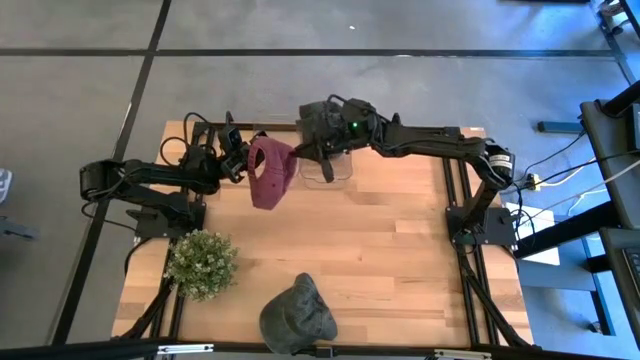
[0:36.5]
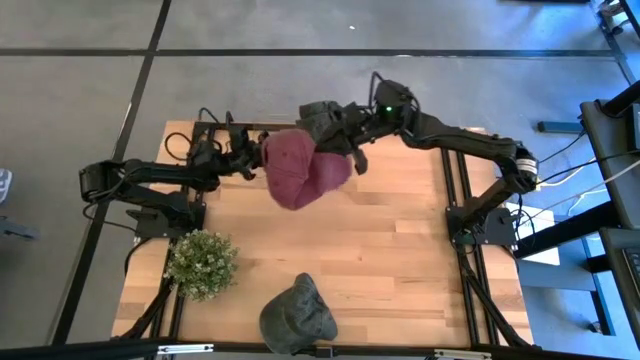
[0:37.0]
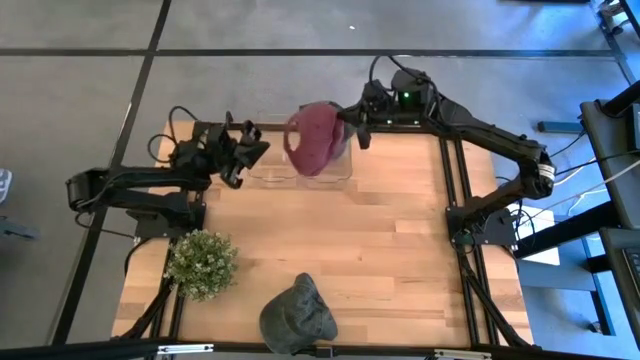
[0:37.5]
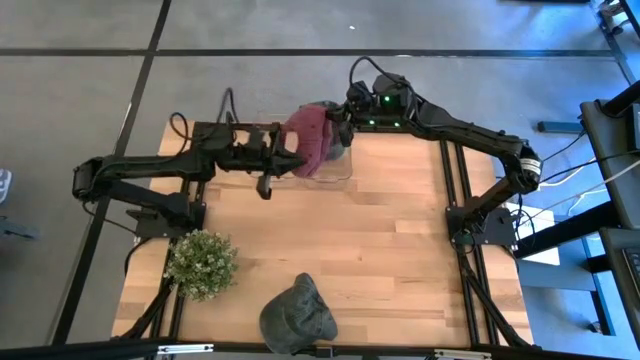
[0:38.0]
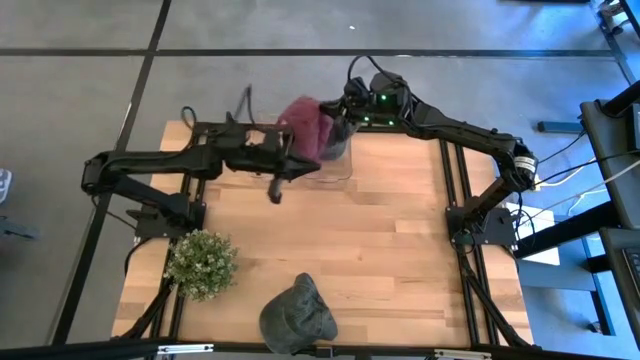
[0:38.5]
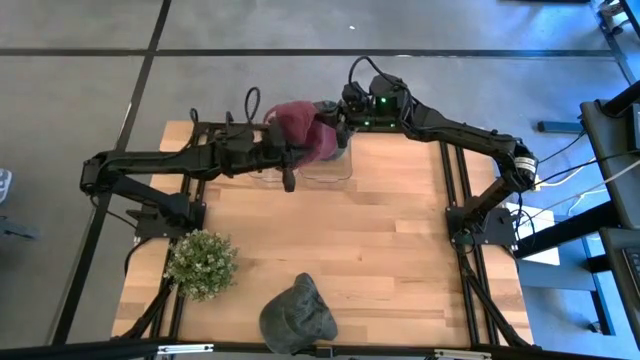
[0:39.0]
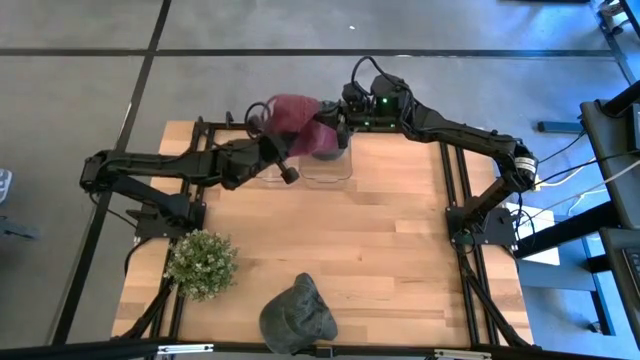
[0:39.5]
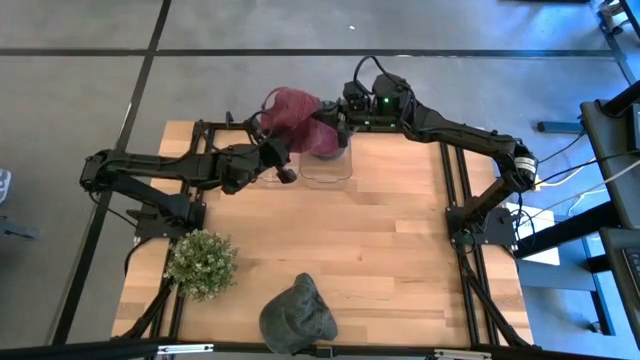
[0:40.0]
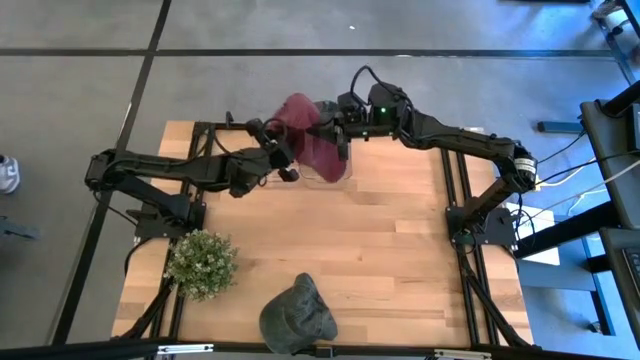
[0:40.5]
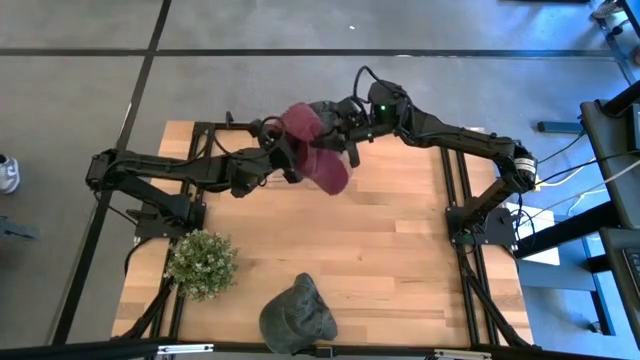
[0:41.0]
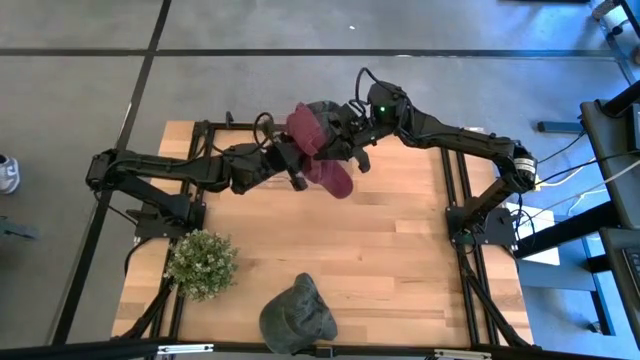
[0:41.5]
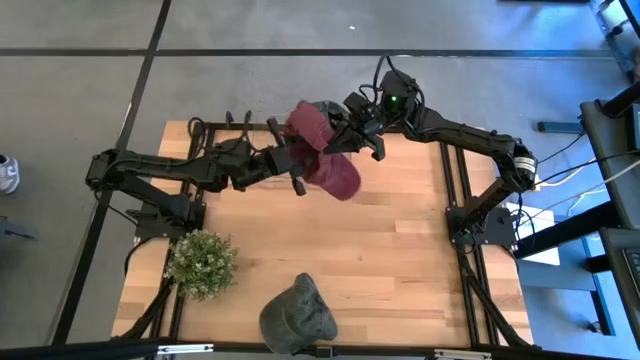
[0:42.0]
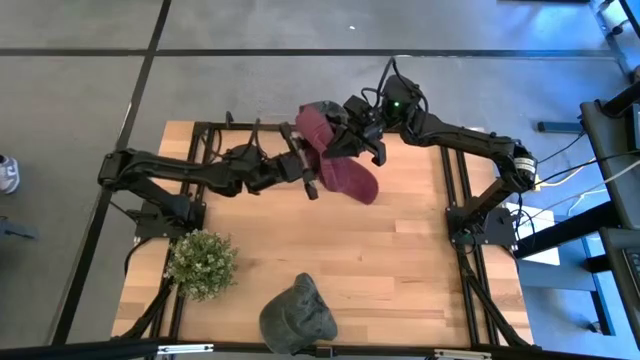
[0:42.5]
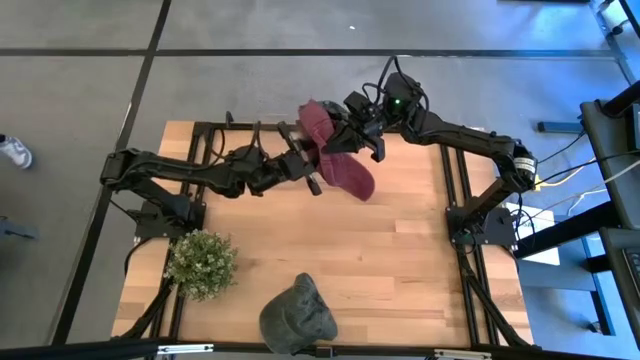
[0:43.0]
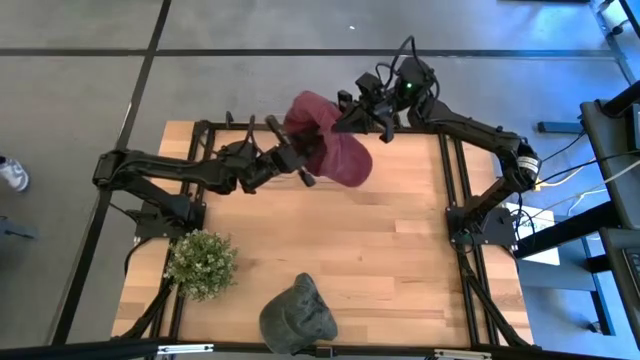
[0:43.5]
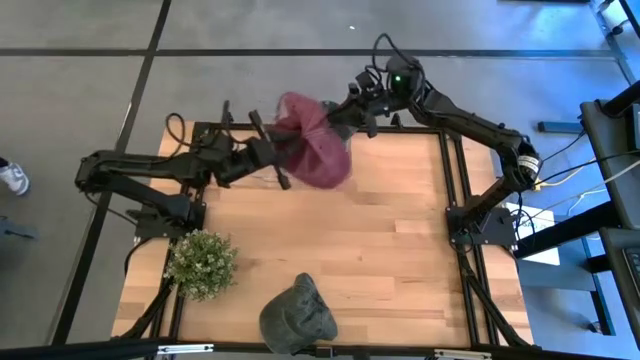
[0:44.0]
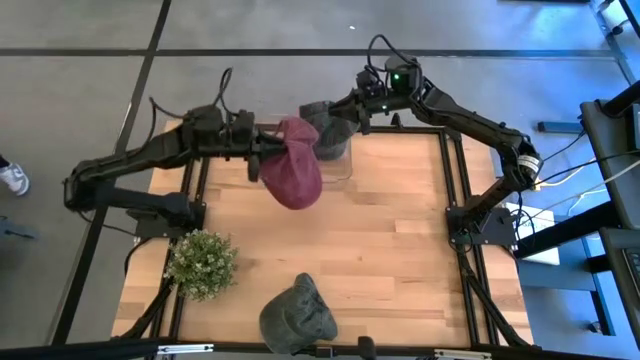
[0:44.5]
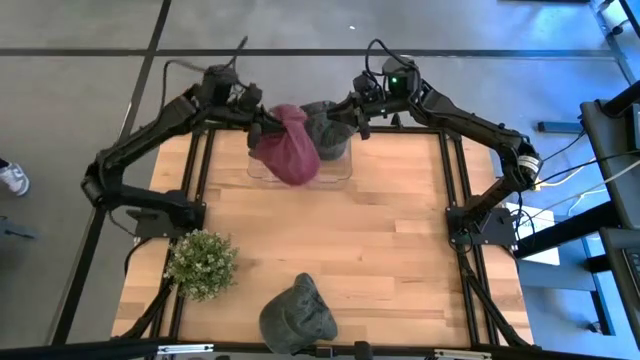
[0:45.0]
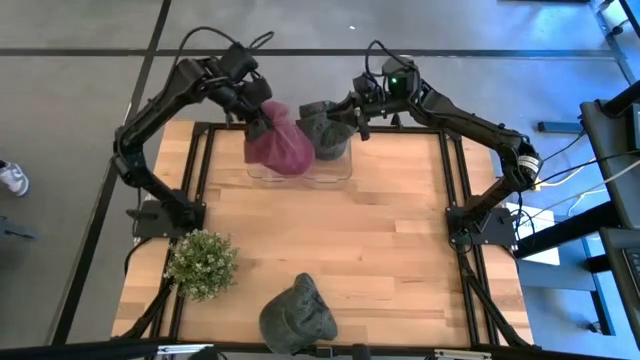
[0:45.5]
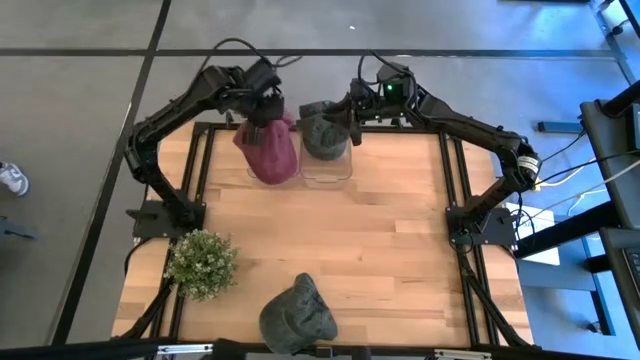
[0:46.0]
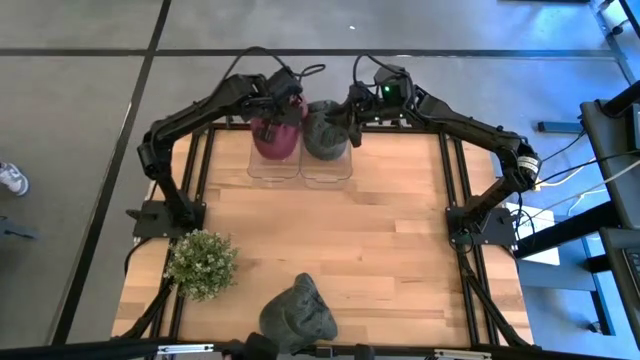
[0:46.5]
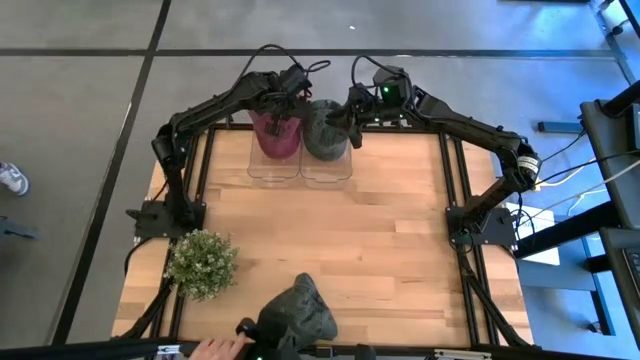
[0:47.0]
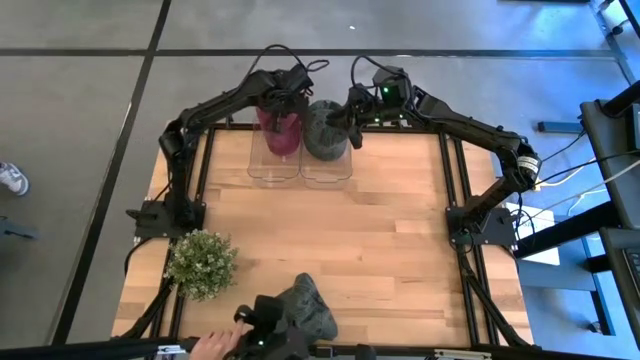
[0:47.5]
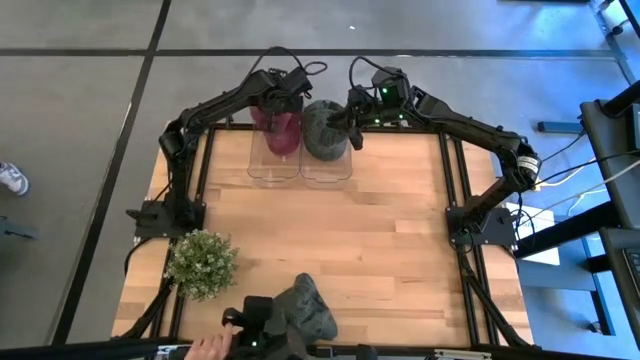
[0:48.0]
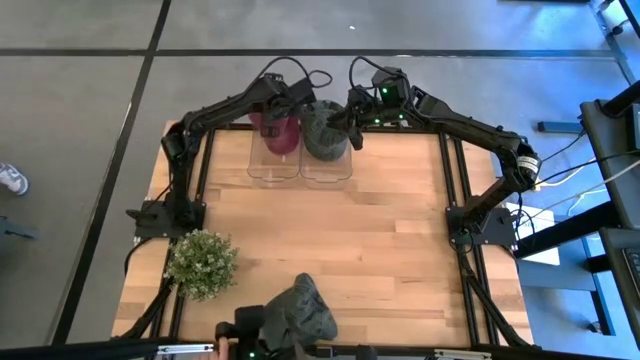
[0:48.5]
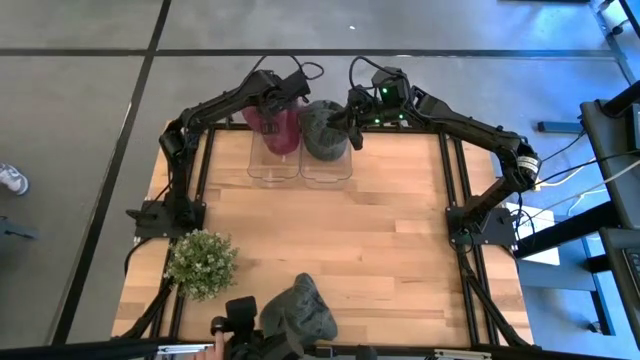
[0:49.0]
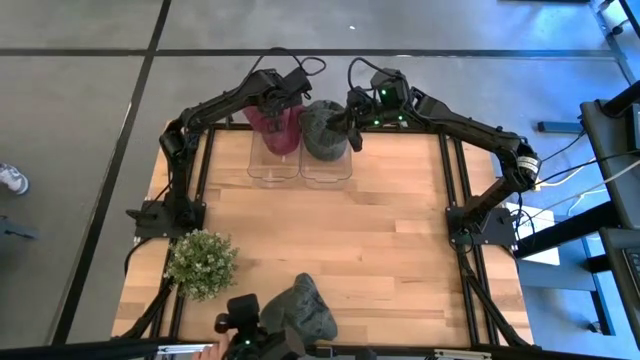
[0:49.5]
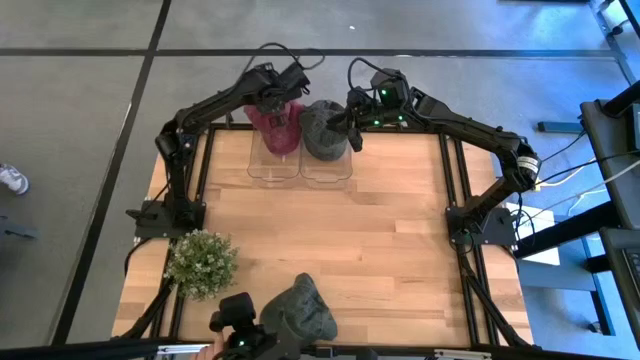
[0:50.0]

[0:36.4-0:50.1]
Task: Pick & Place hat
Put the maroon cap into the left transparent bin

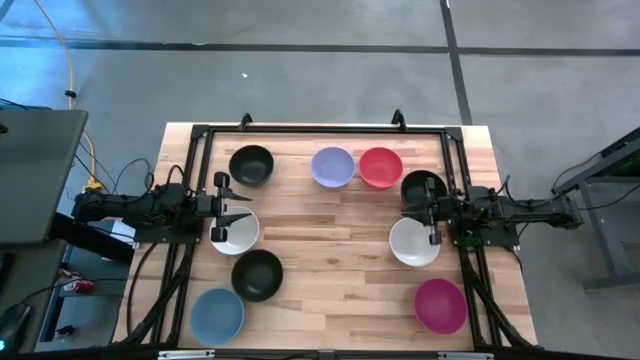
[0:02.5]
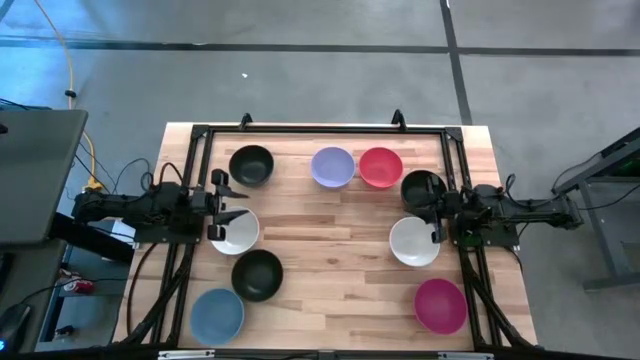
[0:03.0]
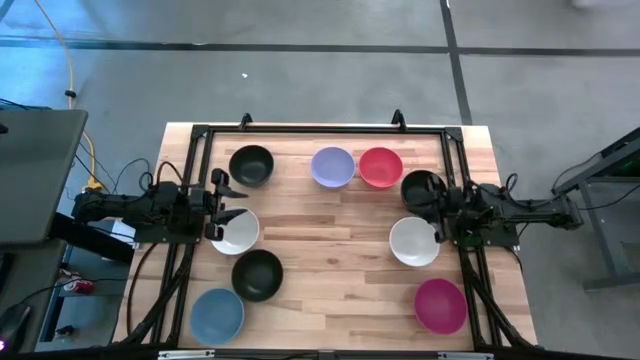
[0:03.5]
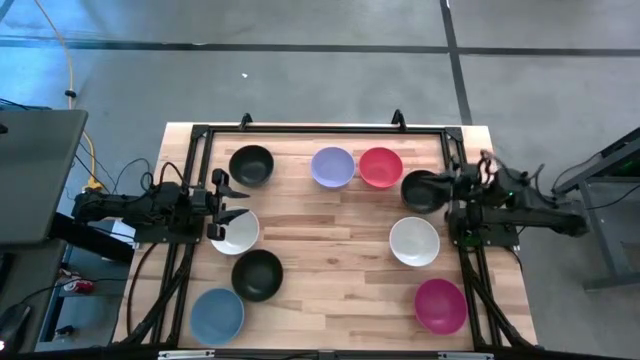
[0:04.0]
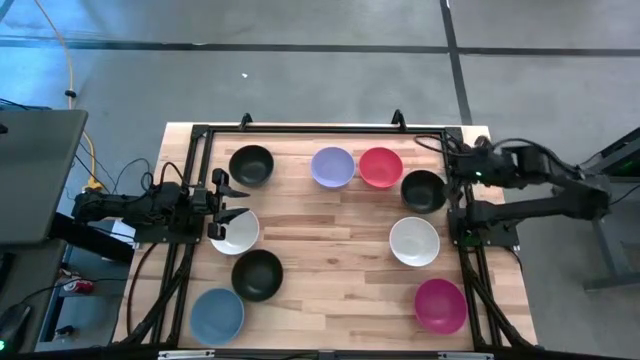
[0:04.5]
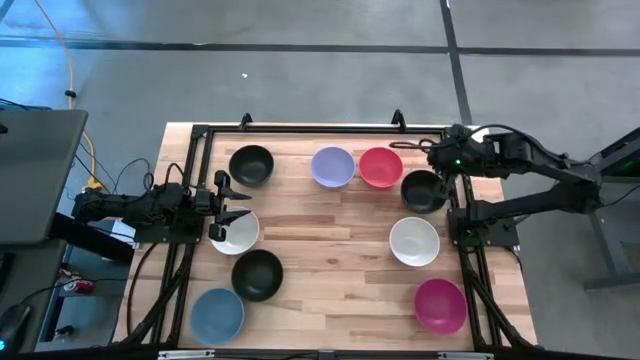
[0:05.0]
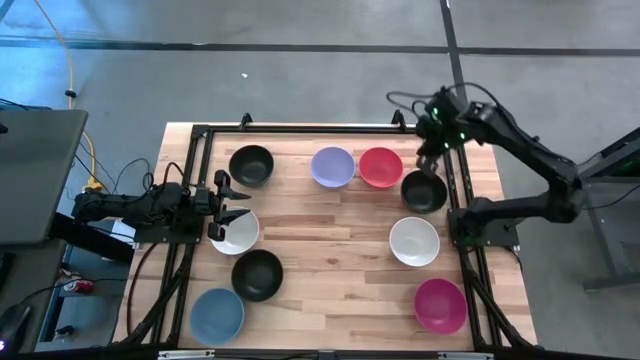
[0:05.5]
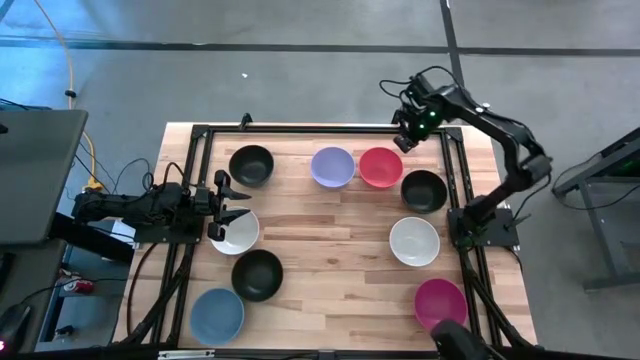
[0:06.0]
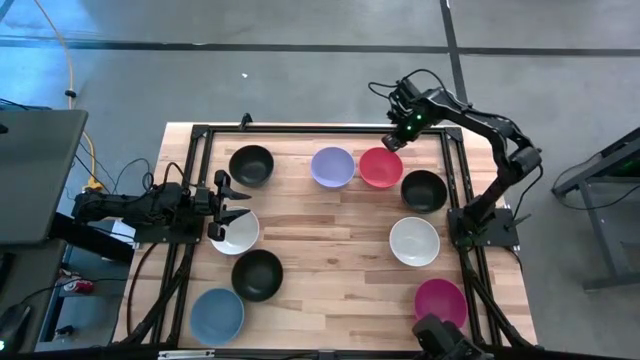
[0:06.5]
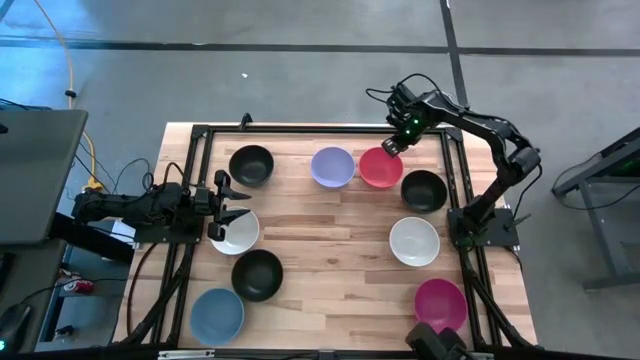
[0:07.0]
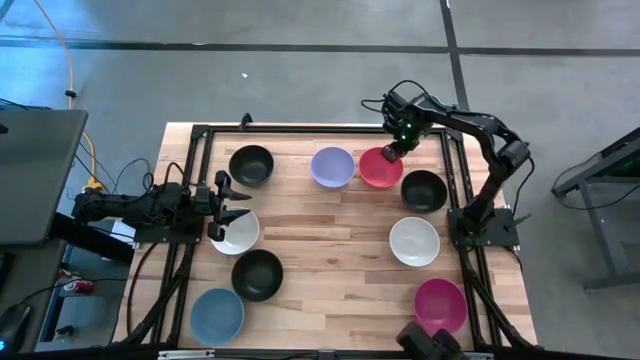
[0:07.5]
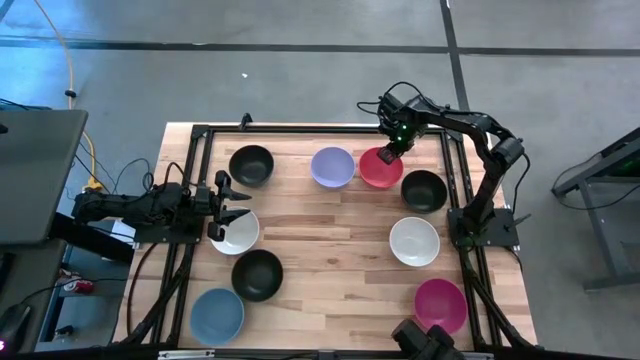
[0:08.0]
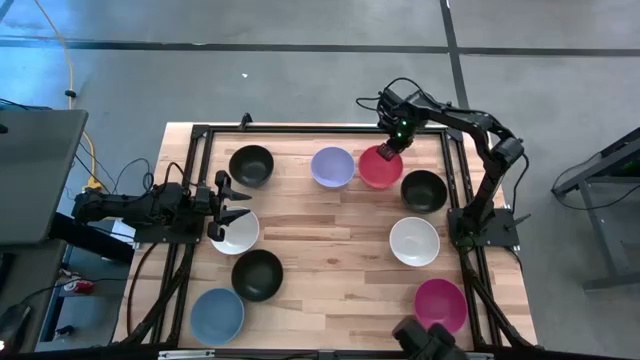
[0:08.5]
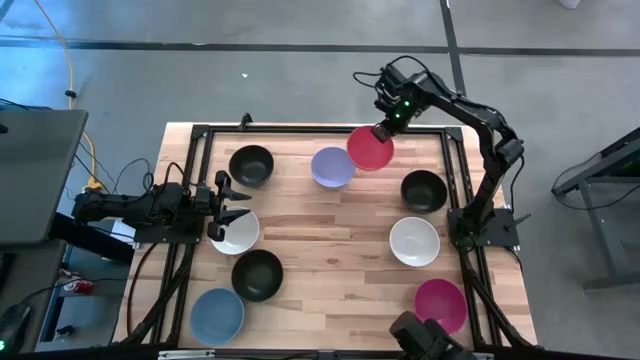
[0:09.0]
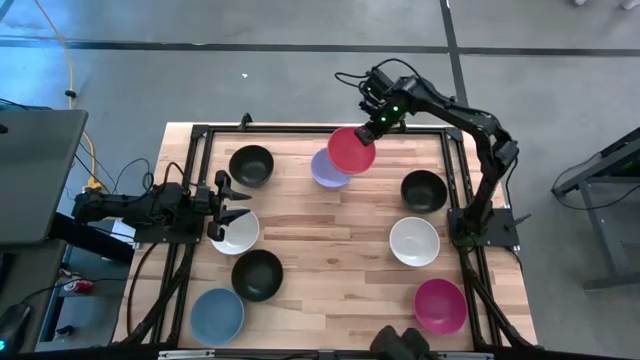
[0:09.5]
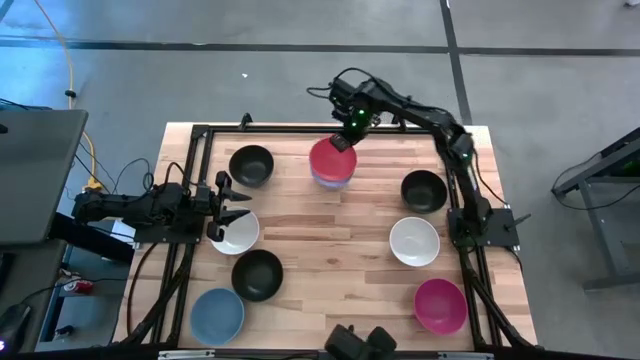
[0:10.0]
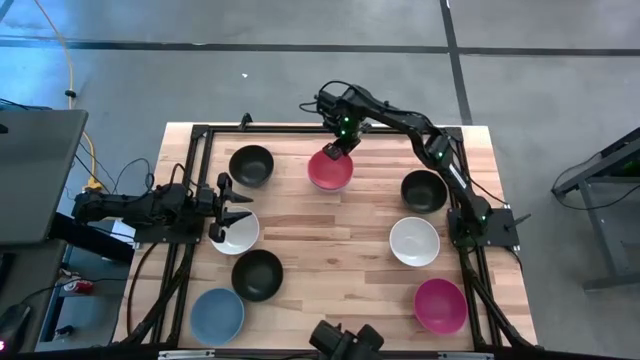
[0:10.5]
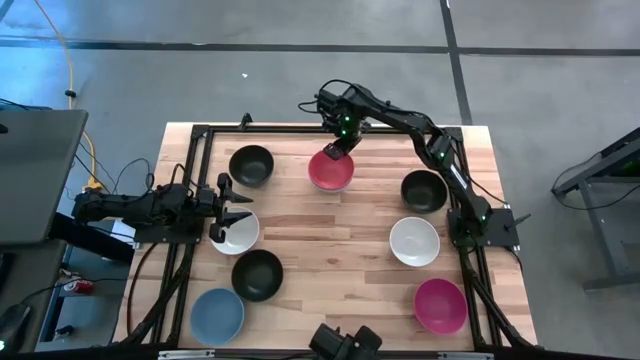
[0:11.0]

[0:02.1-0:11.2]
Task: Nest bowls inside each other
Stack the orange bowl on top of the purple bowl
